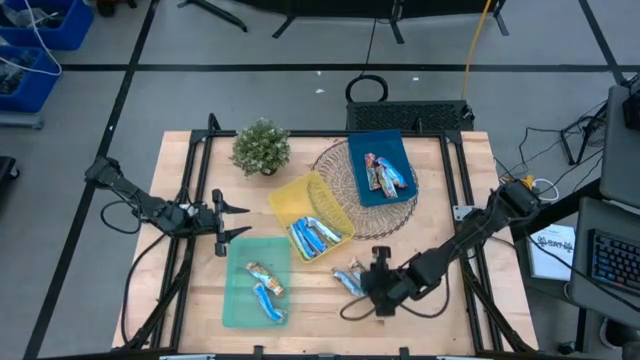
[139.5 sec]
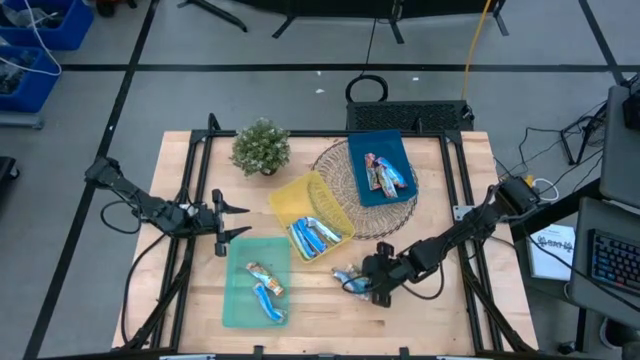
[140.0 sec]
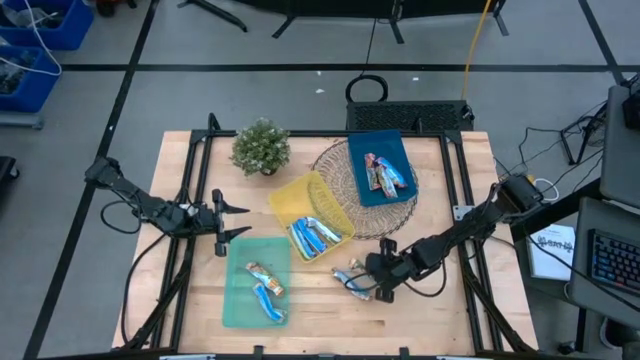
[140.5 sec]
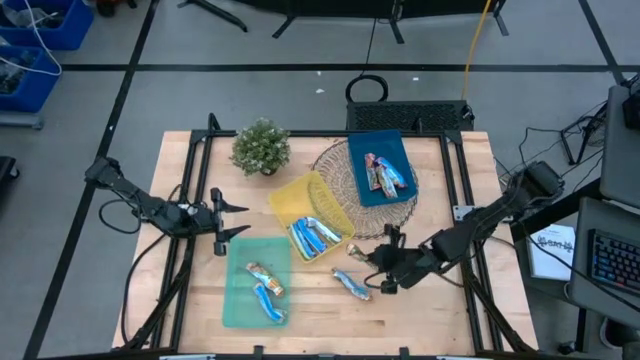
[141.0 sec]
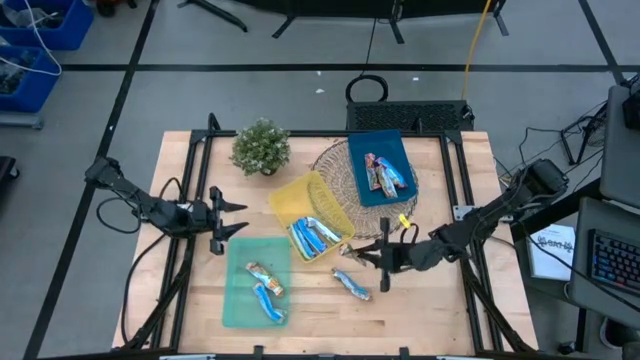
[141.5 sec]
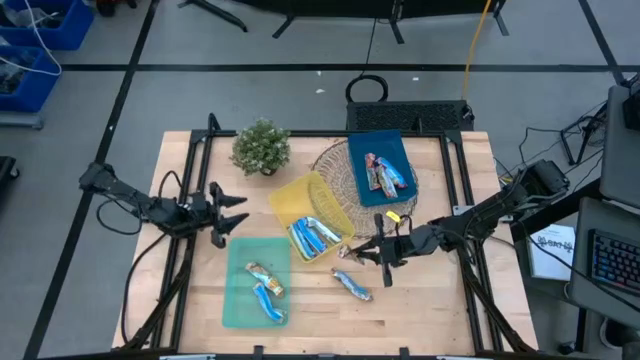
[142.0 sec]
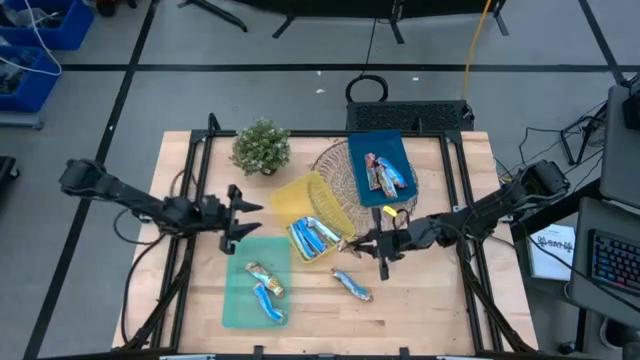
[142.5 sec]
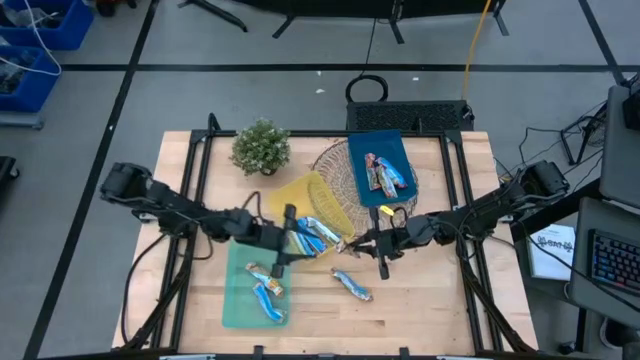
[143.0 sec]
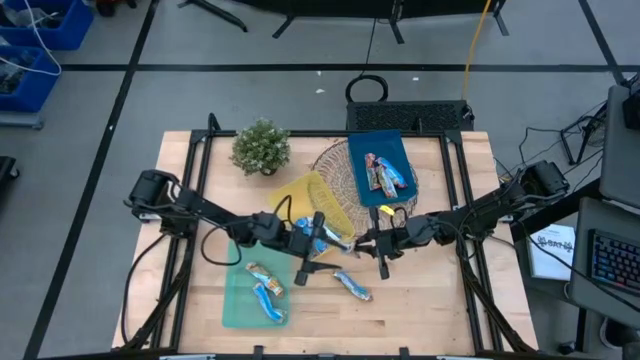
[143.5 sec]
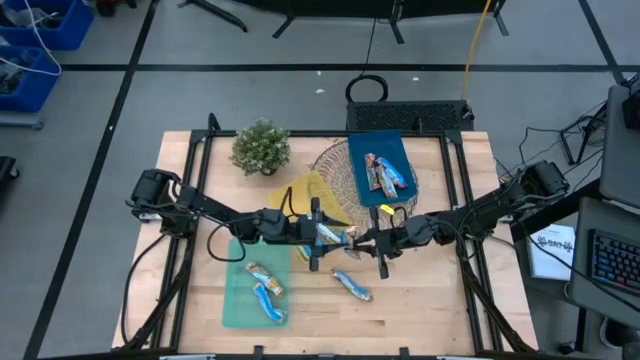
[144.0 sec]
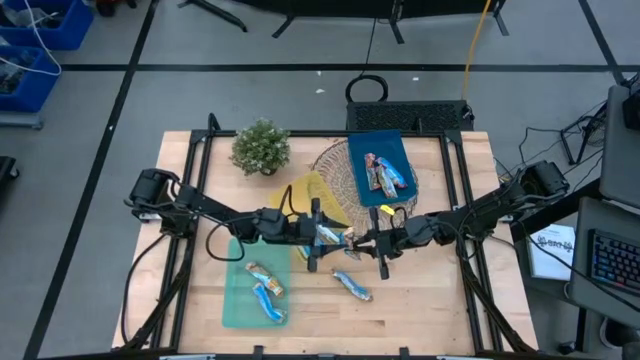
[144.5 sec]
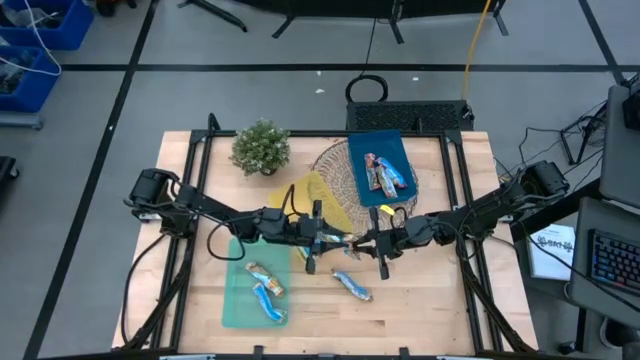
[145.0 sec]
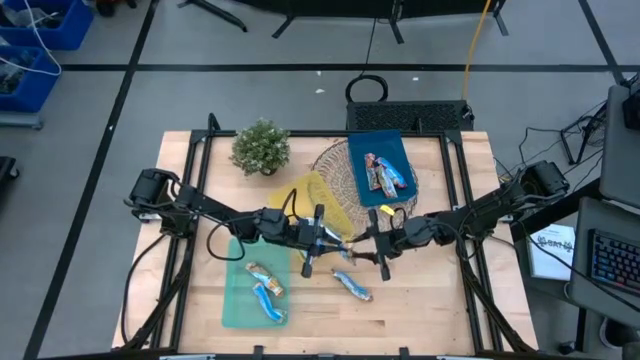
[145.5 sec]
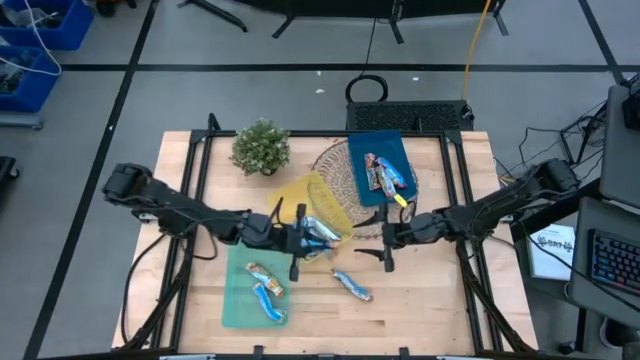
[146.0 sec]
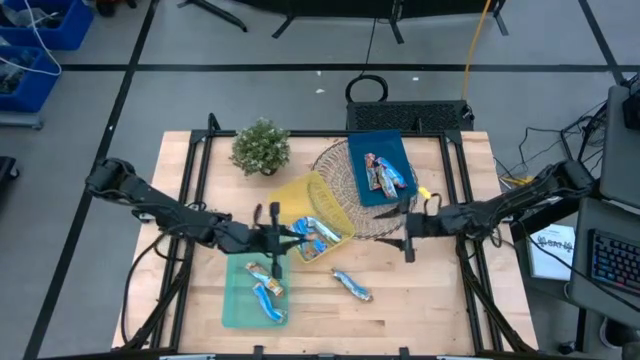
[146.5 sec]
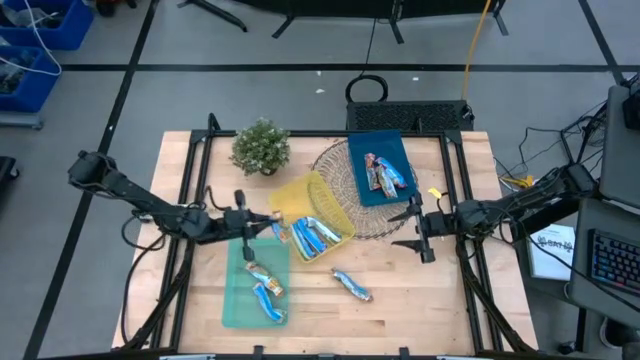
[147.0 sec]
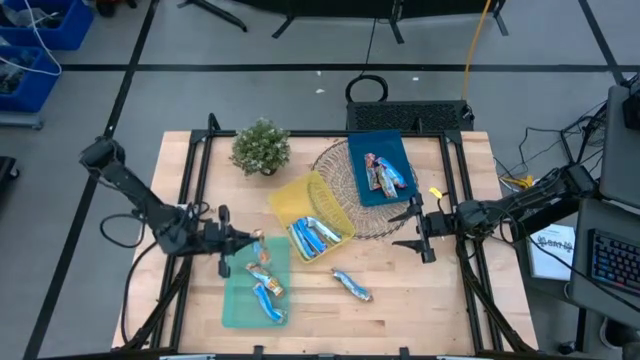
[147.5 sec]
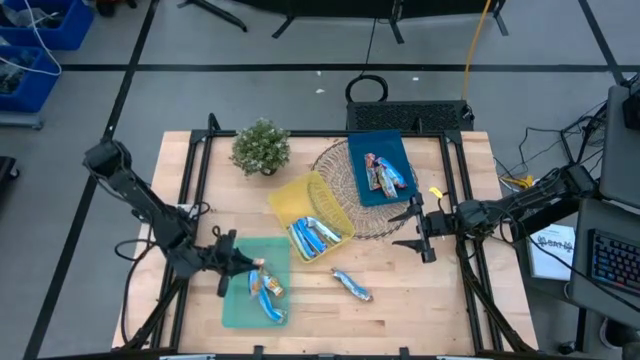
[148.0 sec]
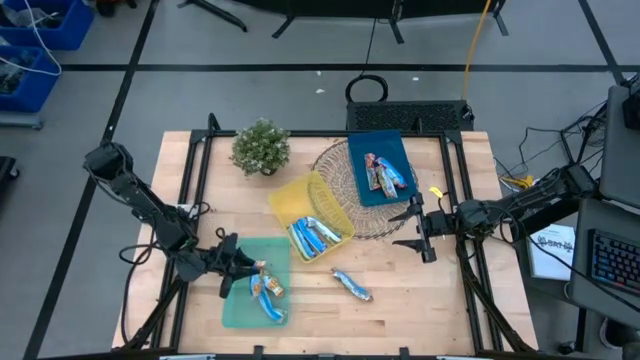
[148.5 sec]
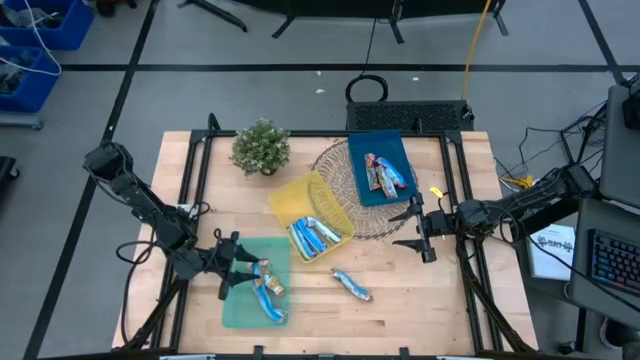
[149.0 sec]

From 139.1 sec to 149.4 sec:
Task: Pick and place Granola Bars by type
Put the yellow granola bar into the green bin

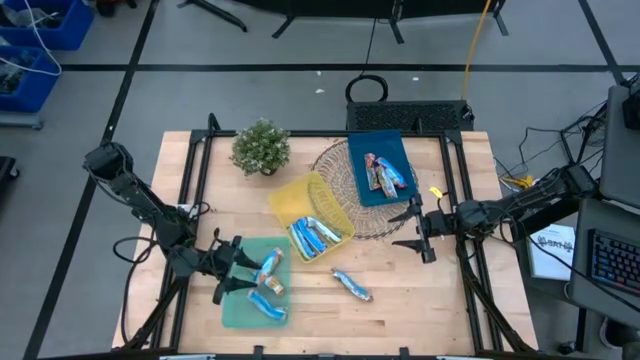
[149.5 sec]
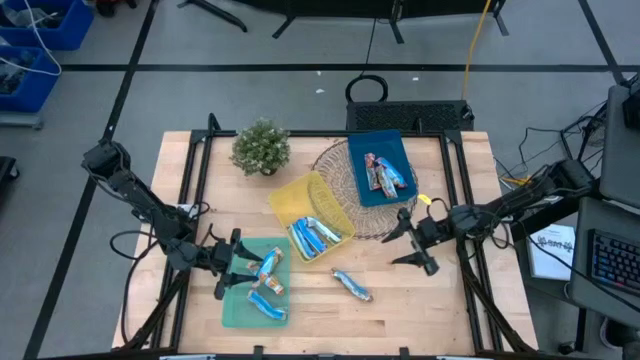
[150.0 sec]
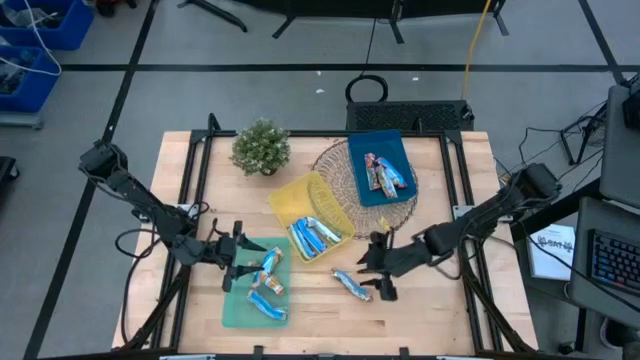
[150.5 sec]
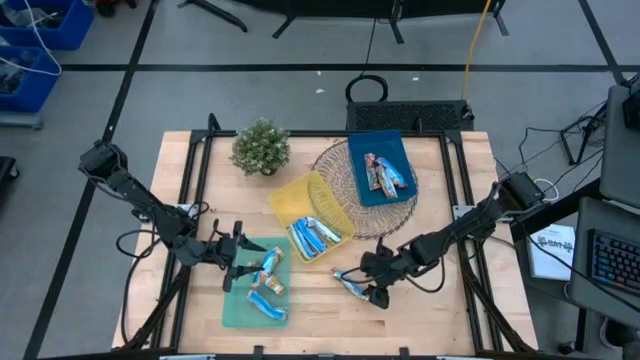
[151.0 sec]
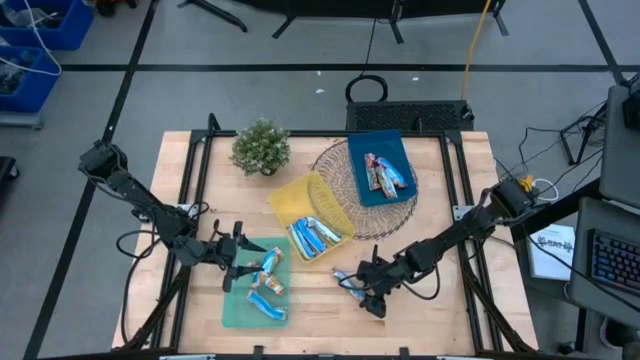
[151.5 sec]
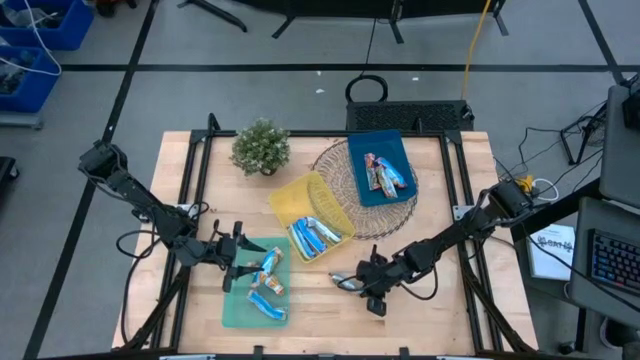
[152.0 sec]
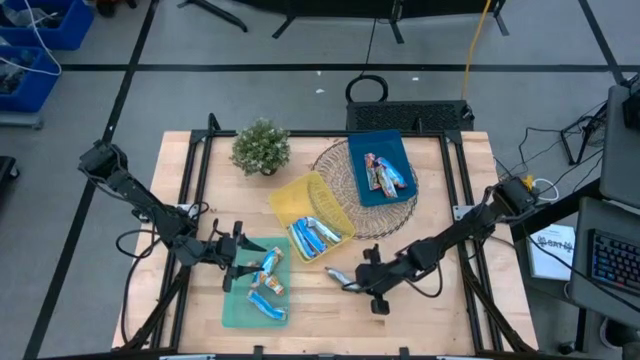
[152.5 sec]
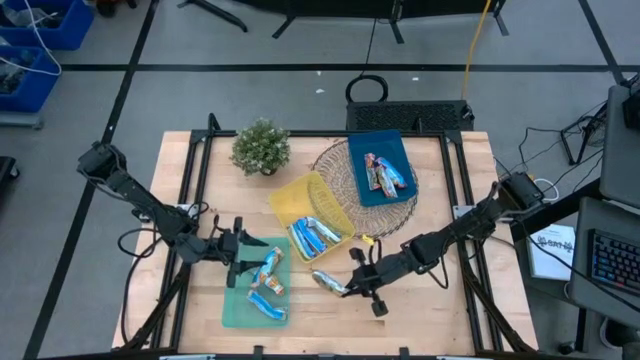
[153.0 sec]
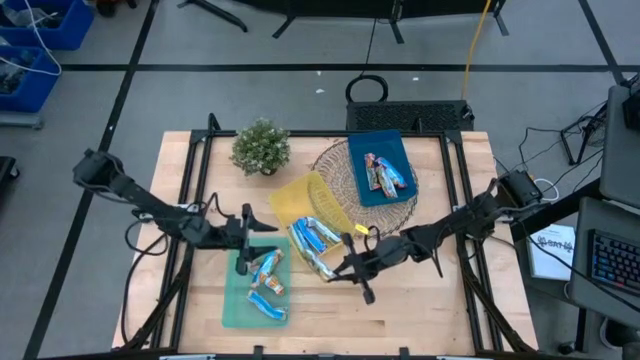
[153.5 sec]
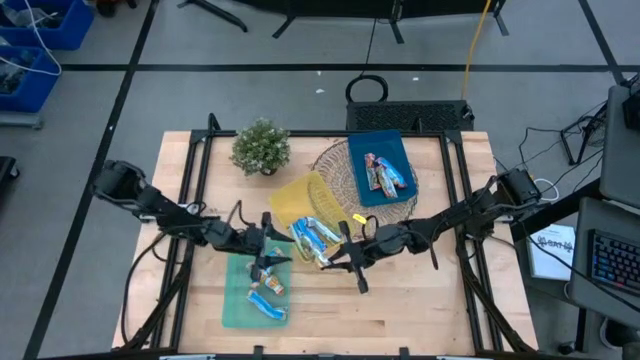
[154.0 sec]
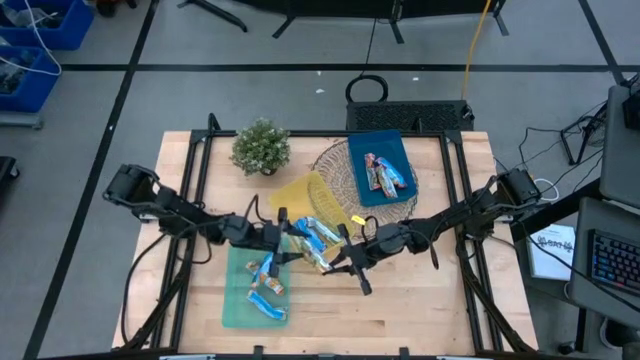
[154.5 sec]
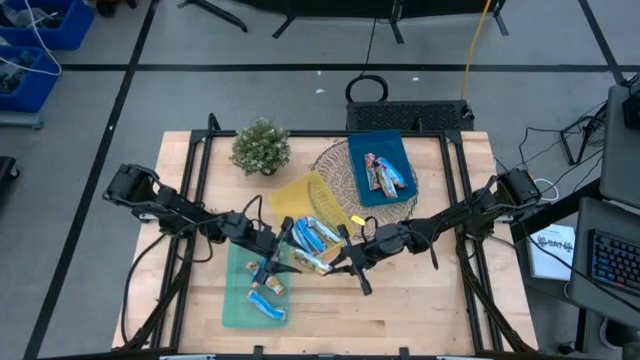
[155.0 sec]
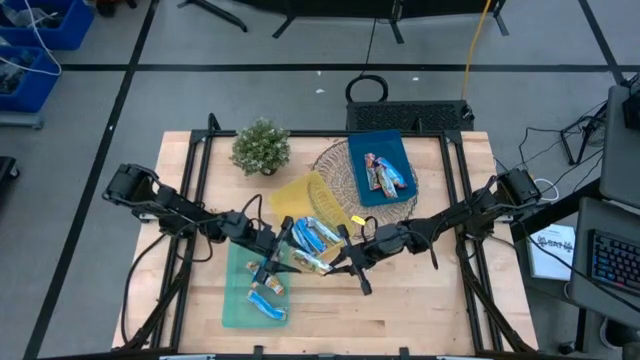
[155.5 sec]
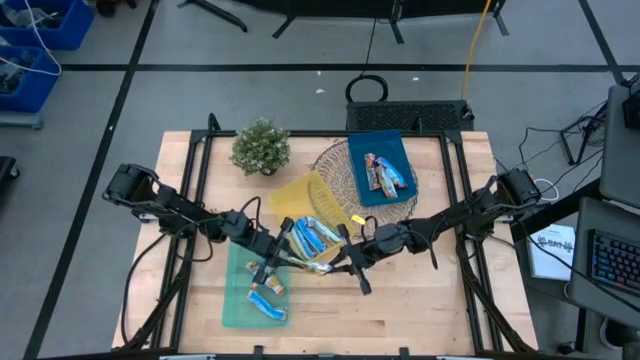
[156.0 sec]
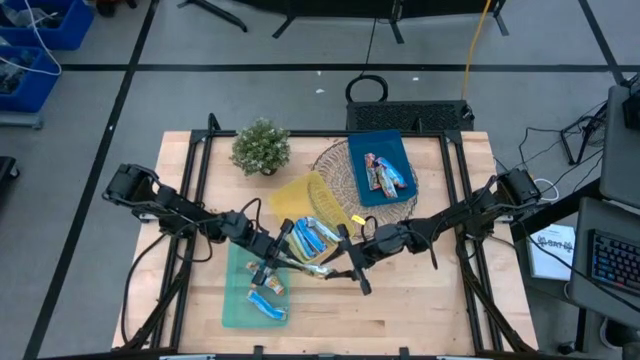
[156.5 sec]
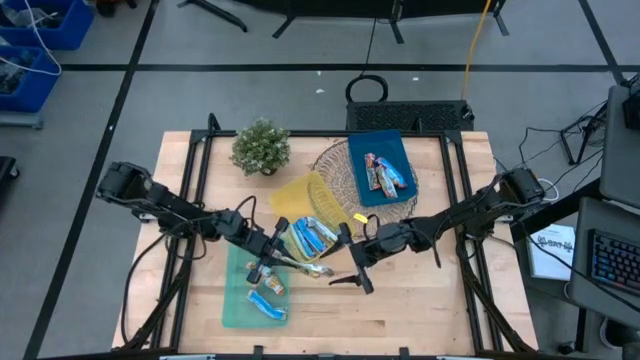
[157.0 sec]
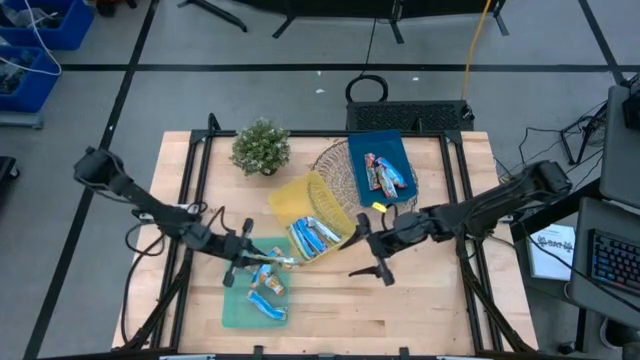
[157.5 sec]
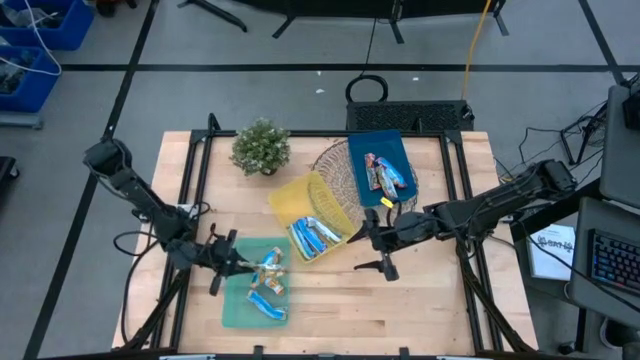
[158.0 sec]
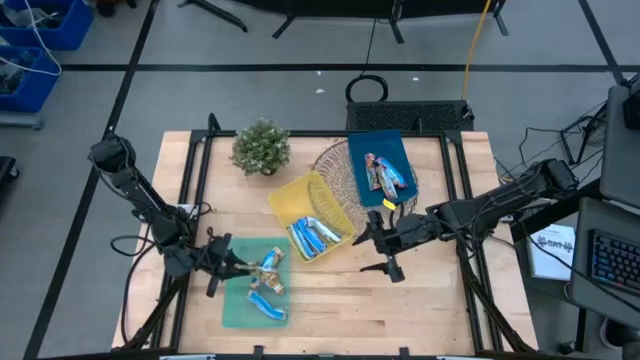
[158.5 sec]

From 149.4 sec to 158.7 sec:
Put the yellow granola bar into the green bin

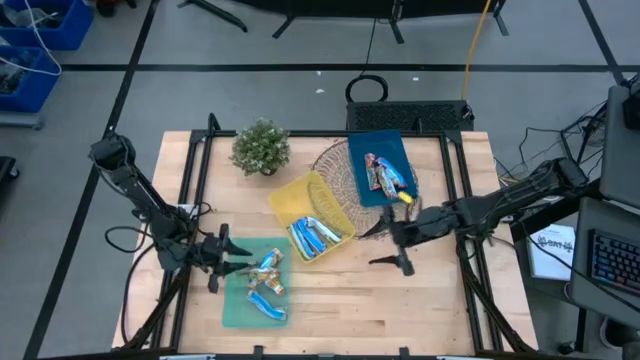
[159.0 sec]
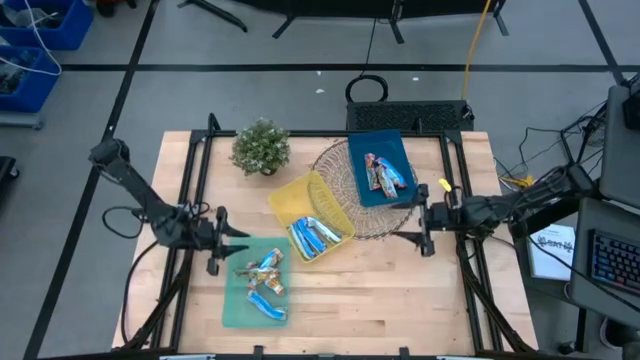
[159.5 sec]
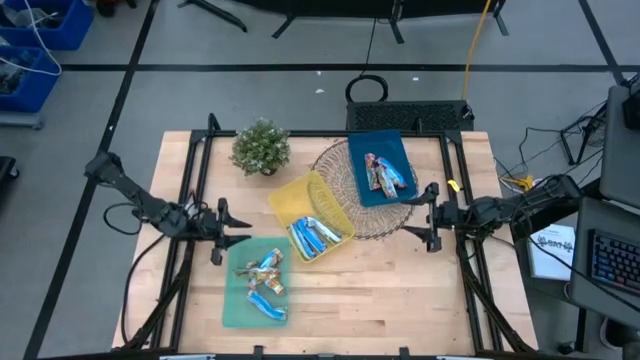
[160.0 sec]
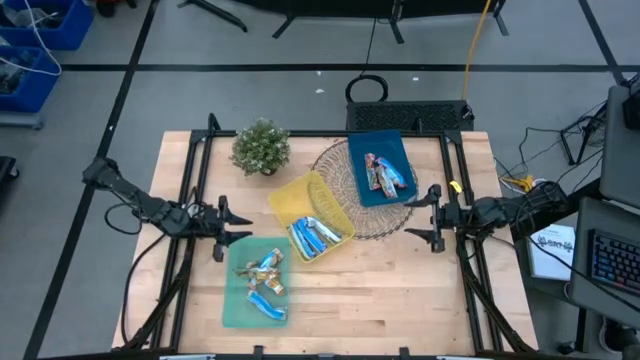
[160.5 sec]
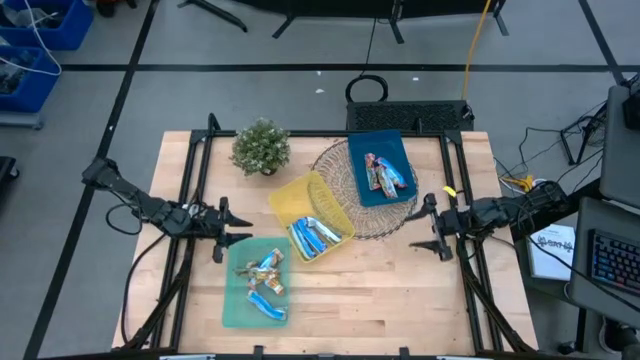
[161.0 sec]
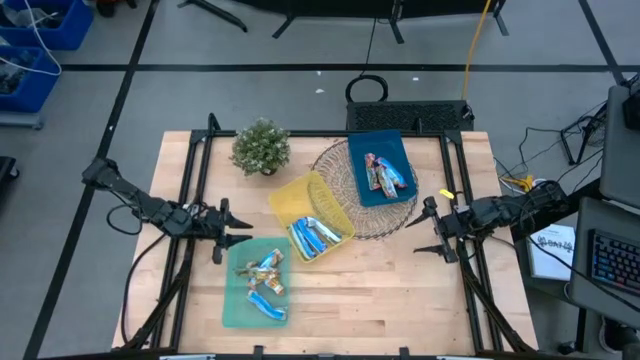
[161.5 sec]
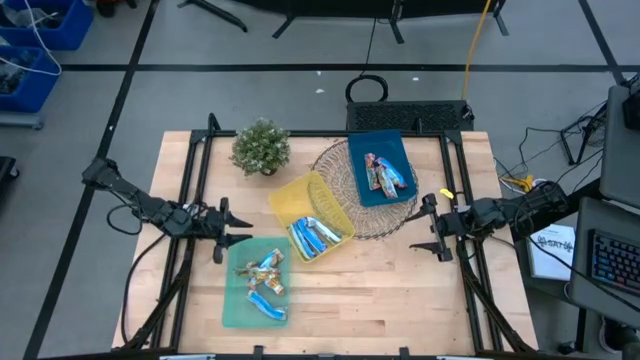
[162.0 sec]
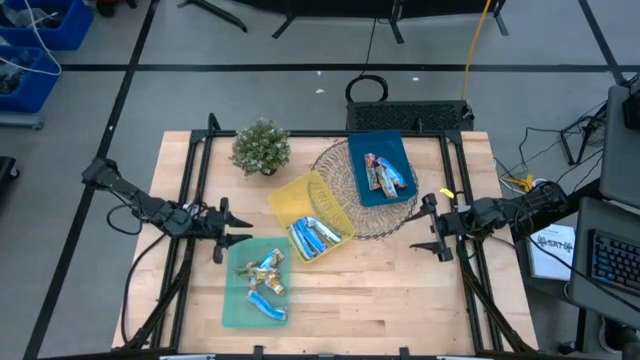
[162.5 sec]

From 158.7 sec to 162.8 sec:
Return to Home Position
